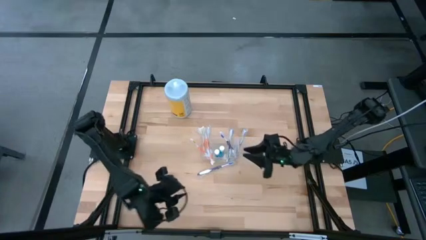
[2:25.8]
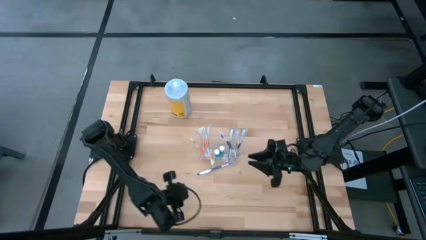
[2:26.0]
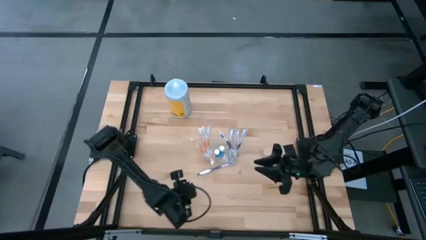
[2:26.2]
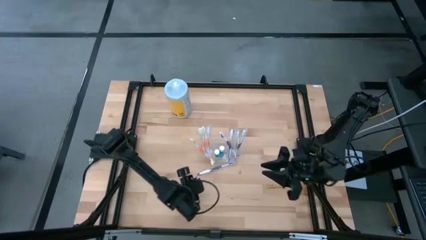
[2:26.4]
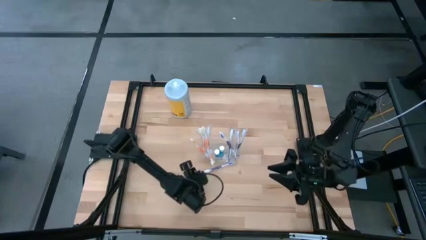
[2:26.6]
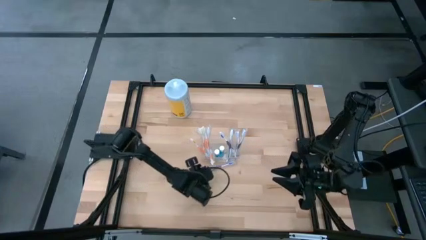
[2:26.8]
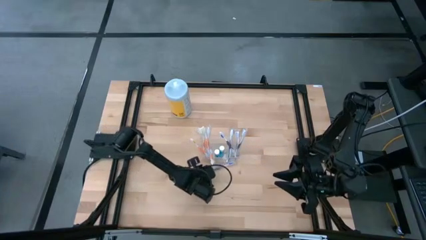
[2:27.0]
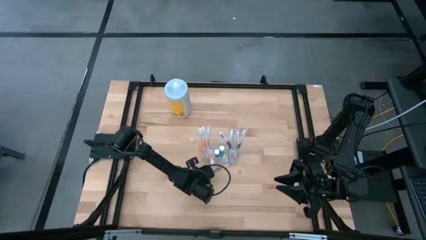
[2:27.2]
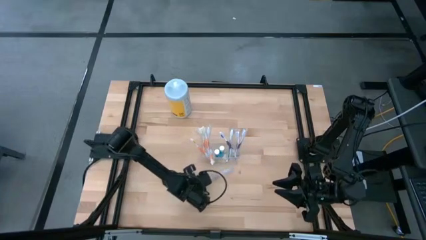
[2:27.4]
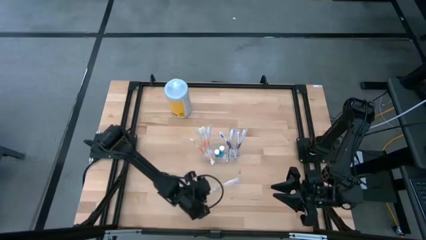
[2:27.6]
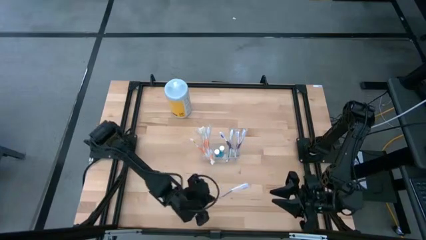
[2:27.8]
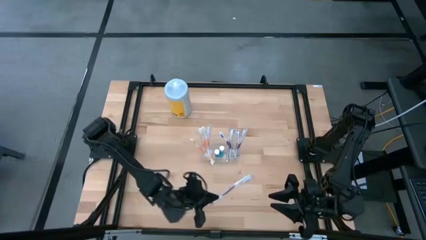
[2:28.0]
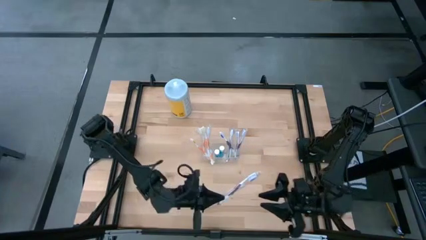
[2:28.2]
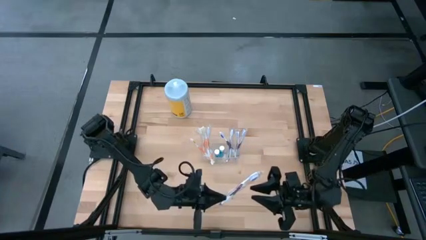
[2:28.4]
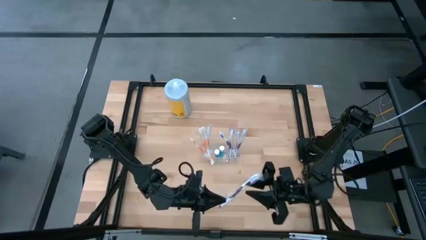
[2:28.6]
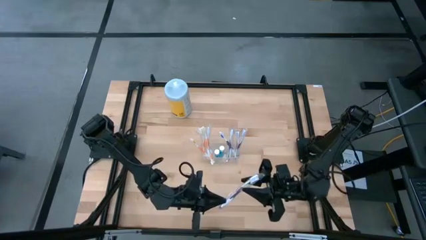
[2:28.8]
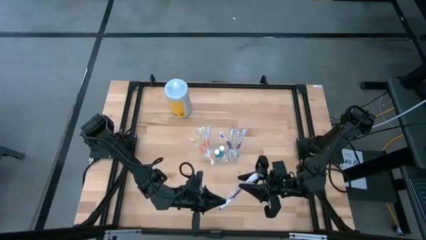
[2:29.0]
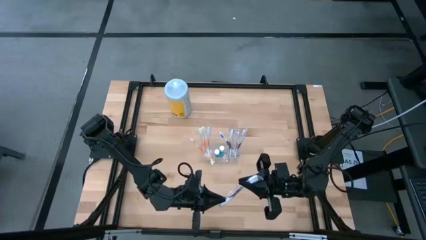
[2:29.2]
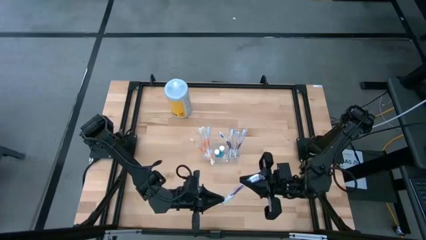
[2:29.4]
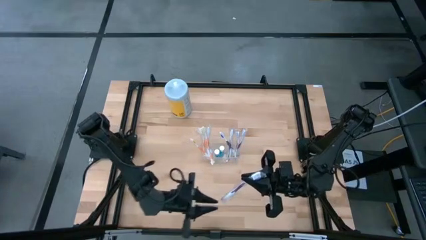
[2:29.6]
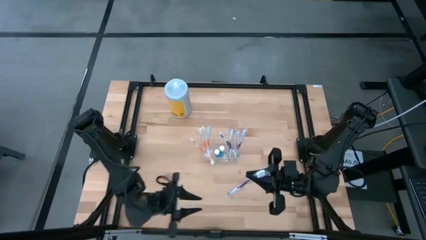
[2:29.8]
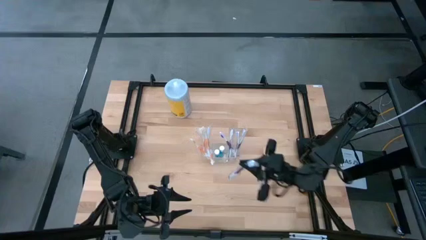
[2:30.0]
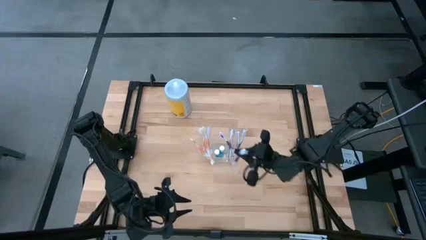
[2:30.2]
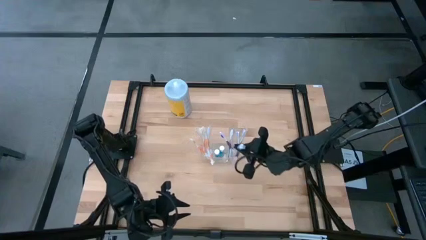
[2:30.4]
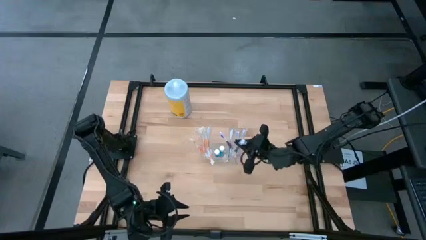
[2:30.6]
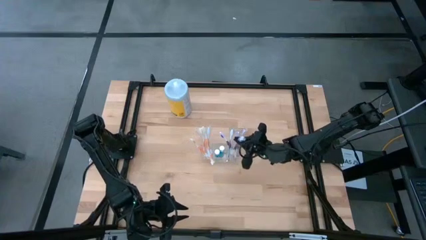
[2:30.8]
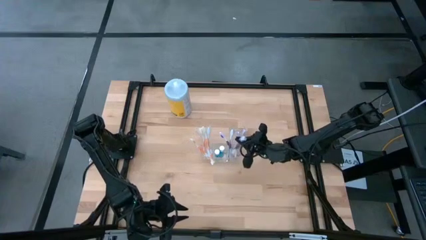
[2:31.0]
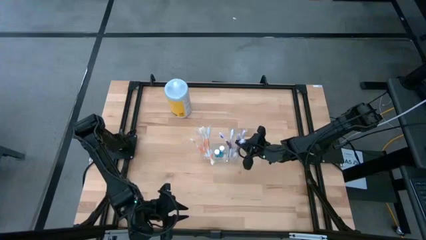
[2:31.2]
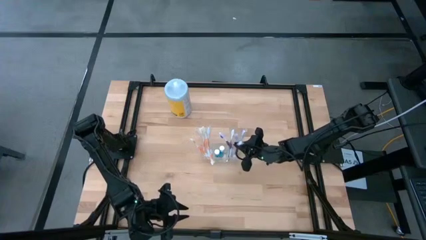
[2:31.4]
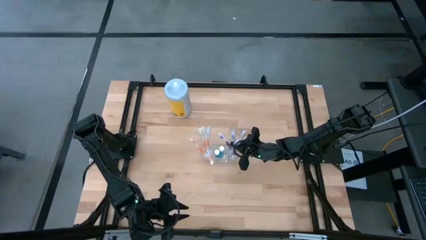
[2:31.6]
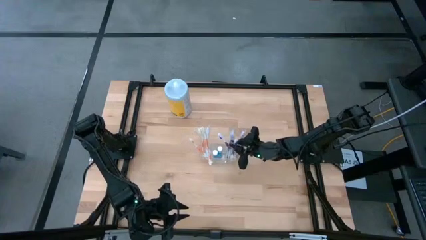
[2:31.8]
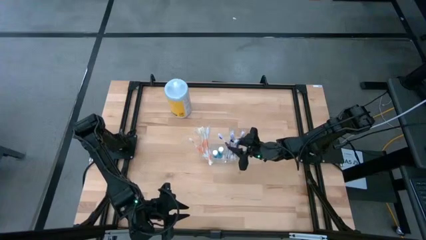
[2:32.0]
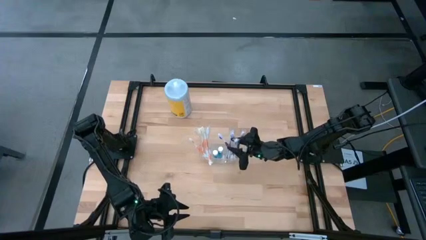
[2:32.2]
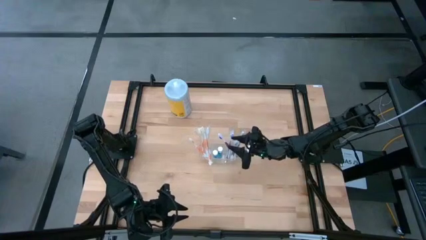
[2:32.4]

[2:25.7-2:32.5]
Task: Pick & Place toothbrushing station
Put the white and violet toothbrush into the right compartment of the transparent organizer

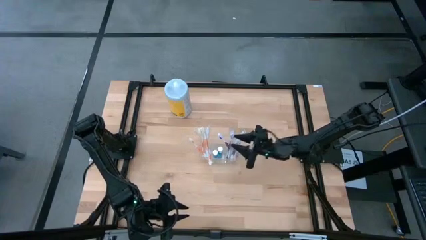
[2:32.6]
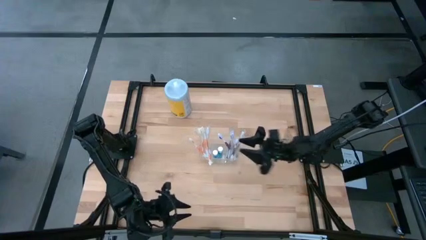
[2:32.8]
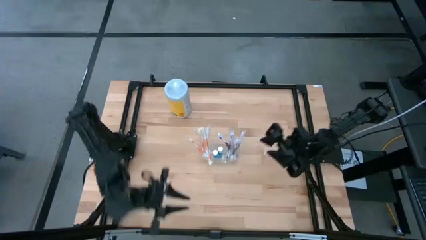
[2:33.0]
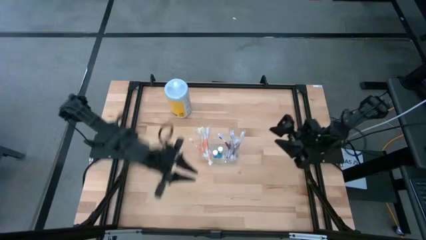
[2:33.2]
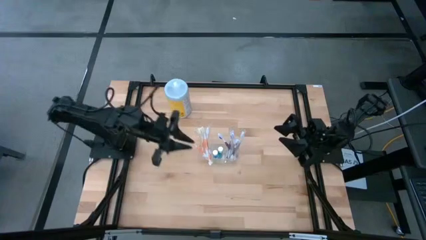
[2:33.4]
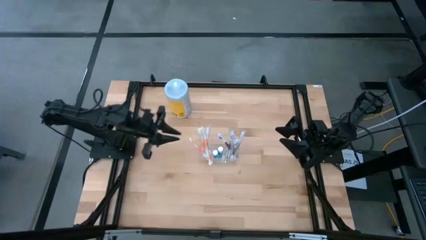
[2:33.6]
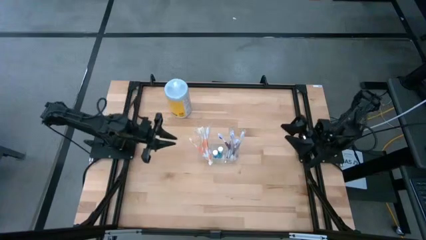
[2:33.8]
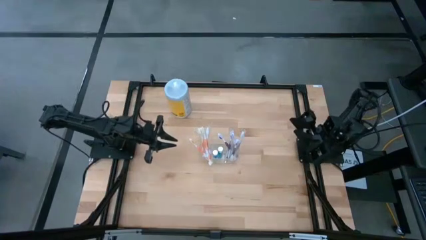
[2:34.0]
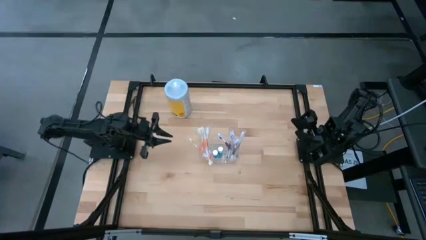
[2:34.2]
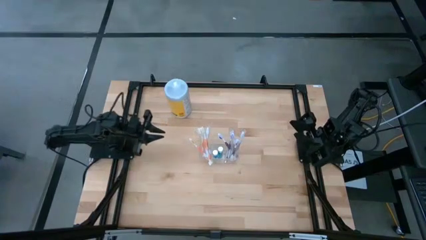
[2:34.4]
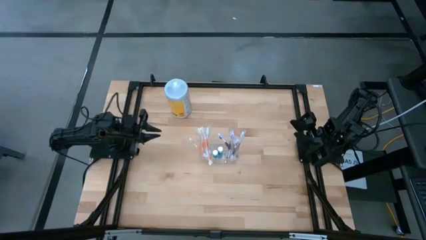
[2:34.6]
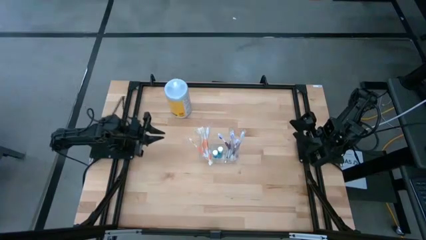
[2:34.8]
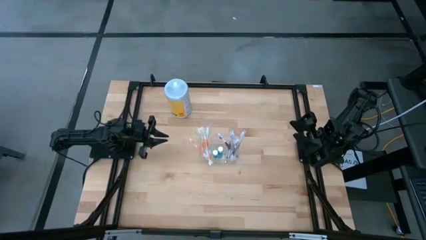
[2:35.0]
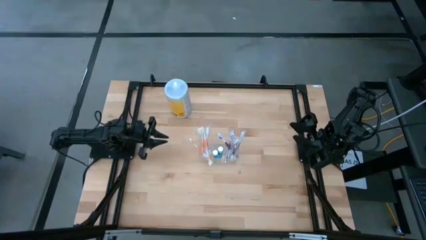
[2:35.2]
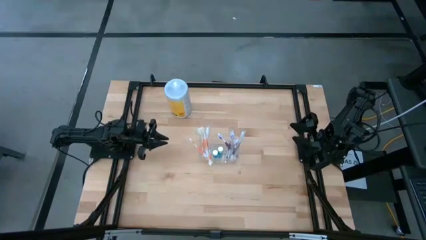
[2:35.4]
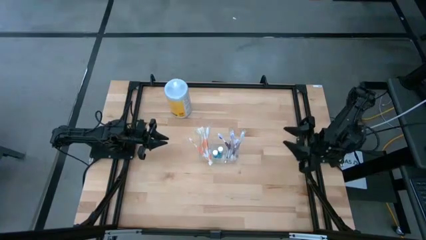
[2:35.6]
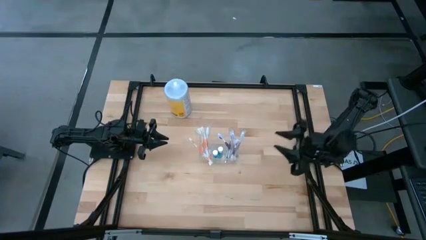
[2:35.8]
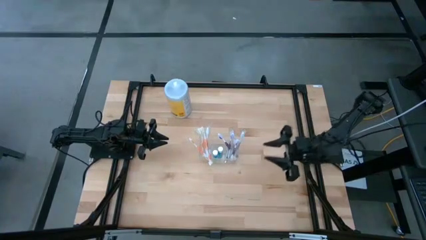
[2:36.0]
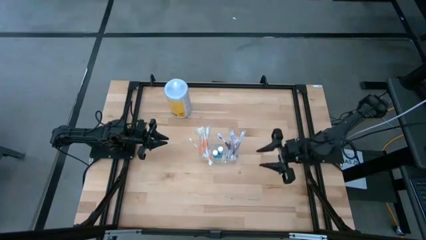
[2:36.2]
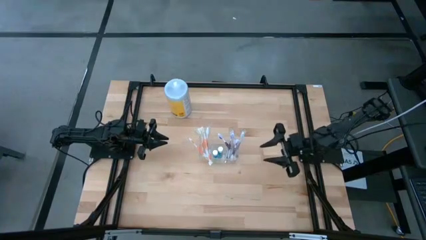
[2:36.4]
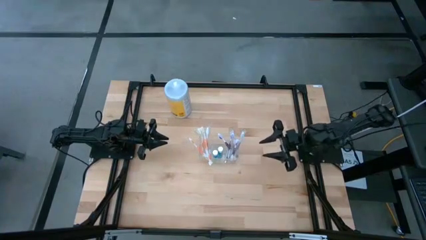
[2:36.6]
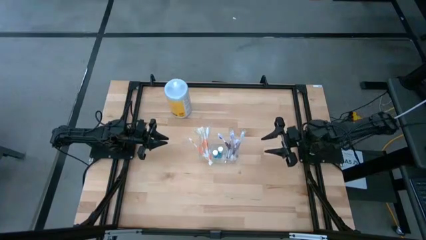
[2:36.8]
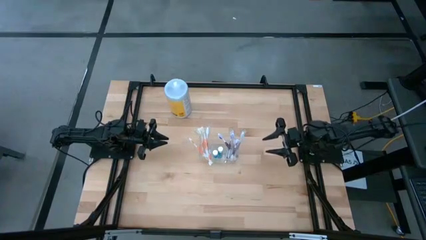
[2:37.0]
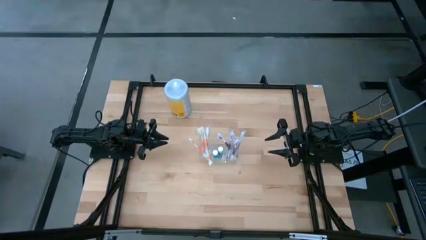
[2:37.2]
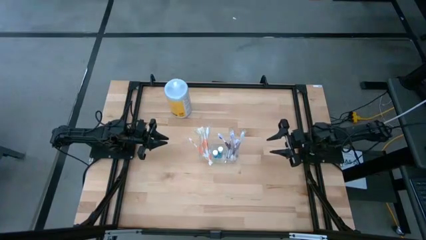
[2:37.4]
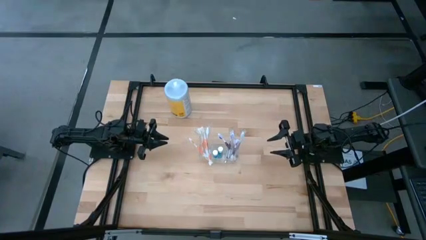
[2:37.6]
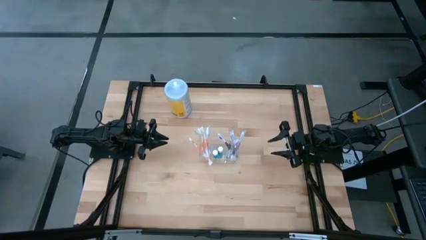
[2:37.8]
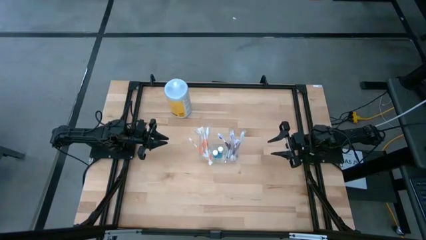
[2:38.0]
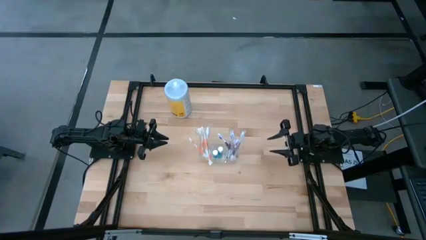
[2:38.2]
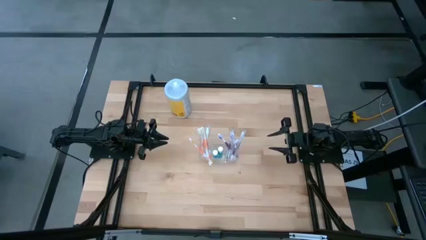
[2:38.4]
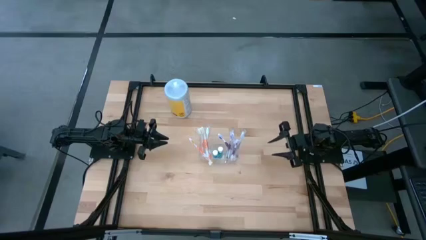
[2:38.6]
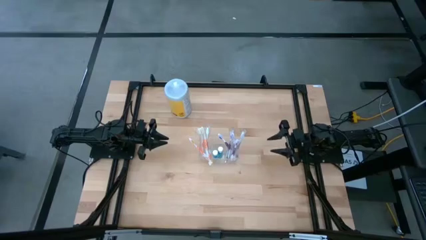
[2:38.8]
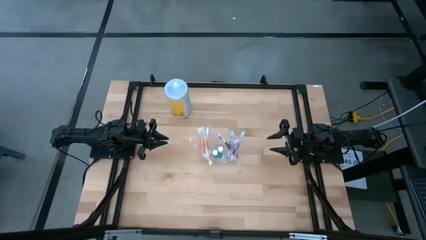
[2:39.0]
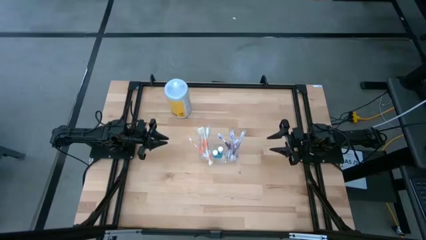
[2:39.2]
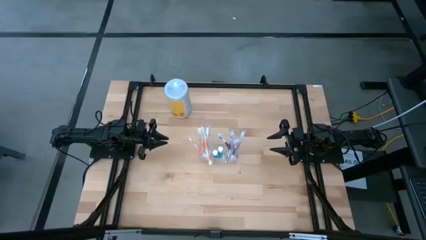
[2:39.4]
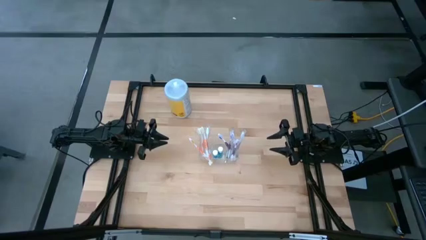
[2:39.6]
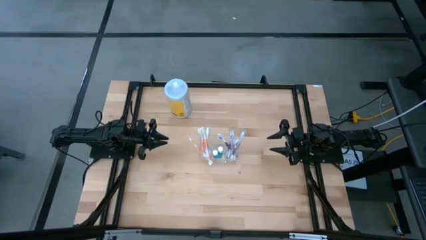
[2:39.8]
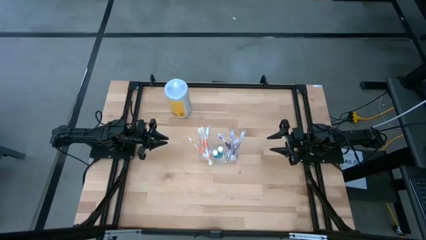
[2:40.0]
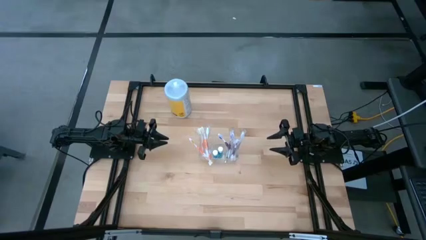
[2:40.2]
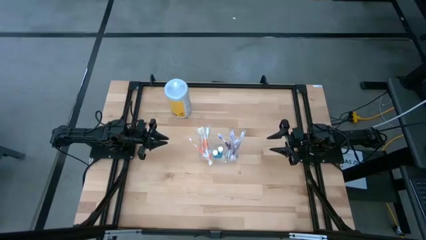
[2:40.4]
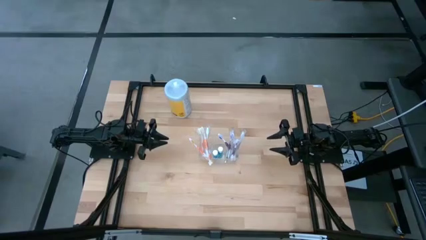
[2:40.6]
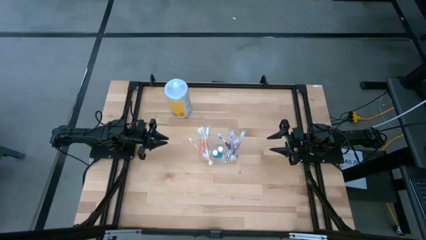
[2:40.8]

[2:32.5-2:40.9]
Return to Home Position
